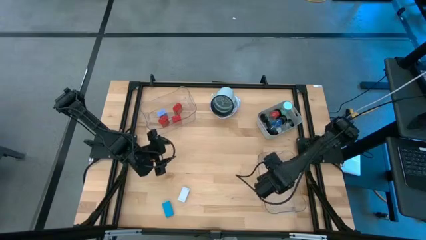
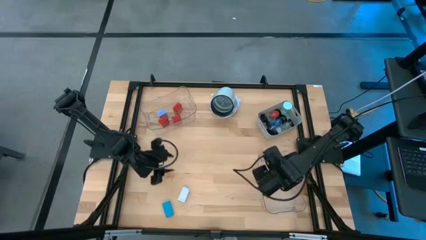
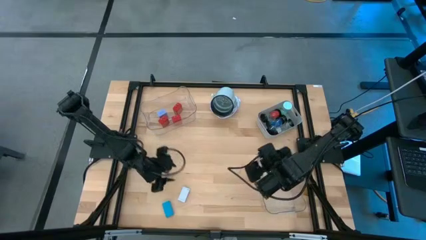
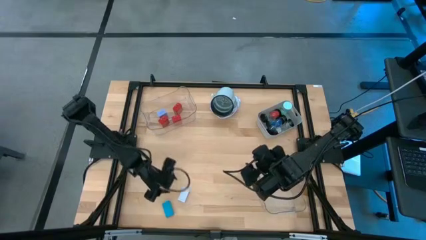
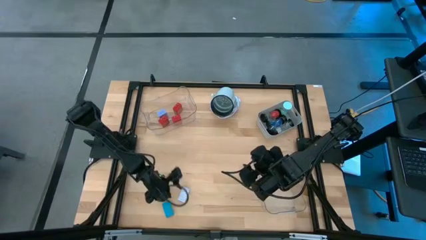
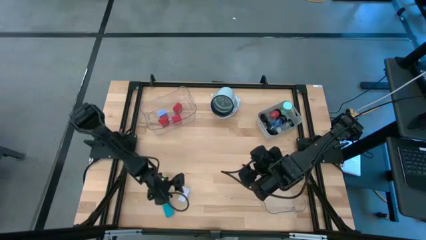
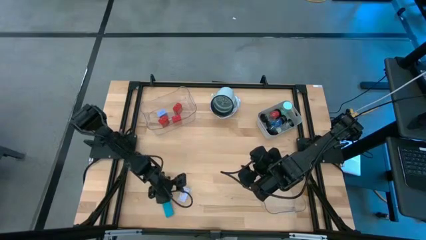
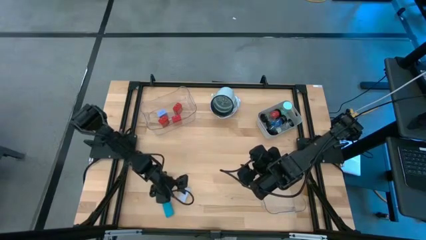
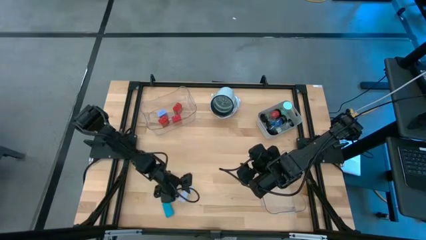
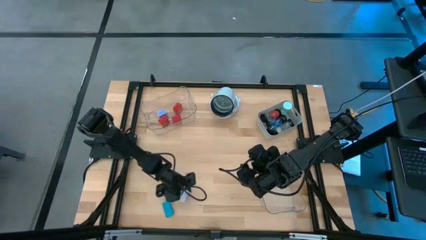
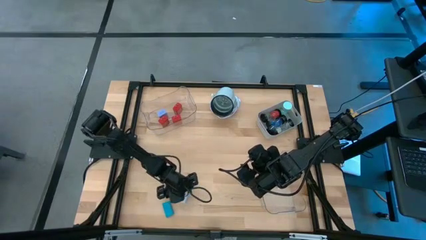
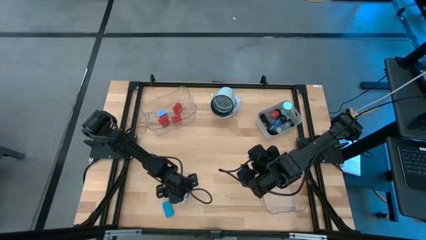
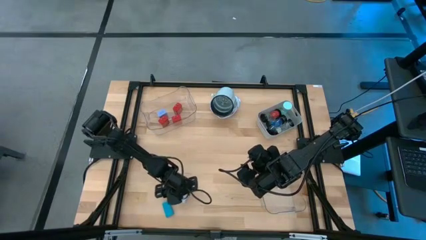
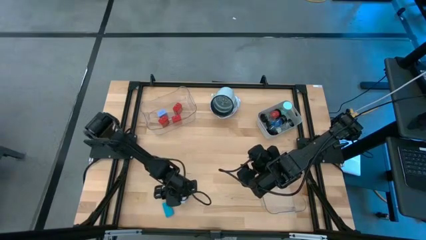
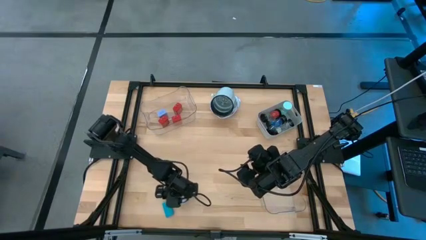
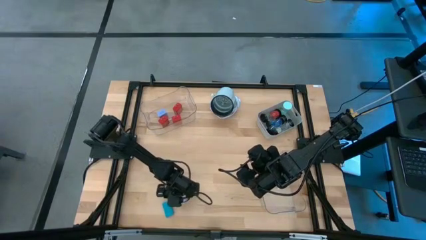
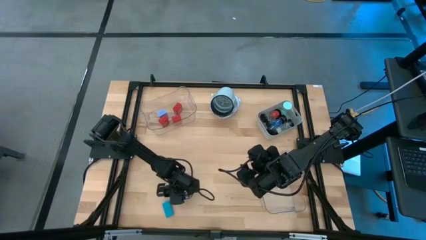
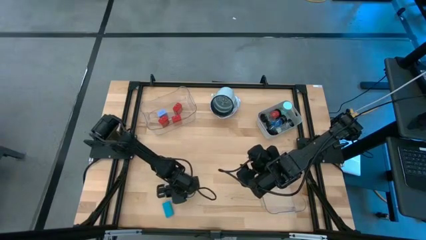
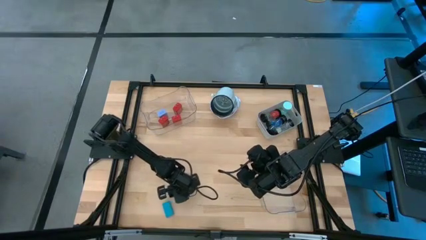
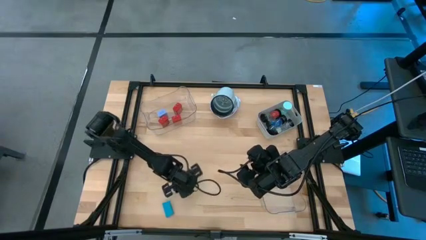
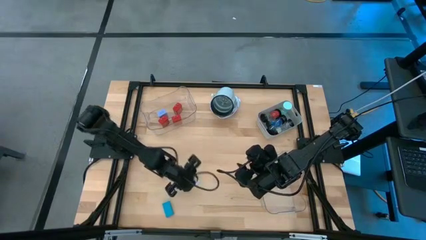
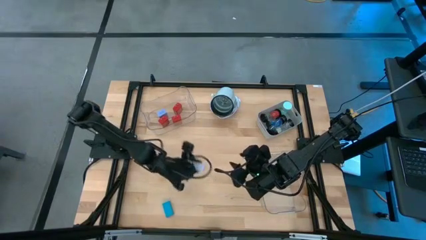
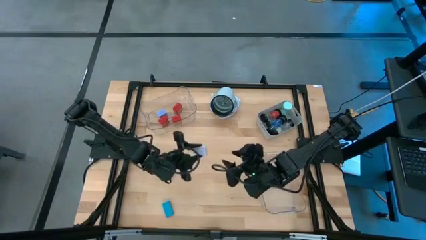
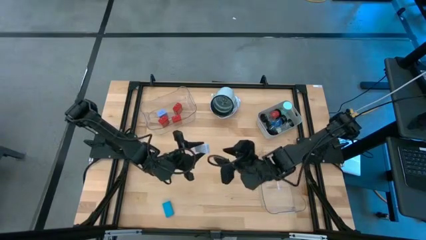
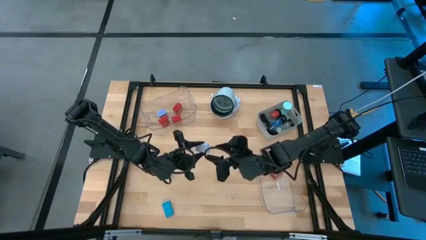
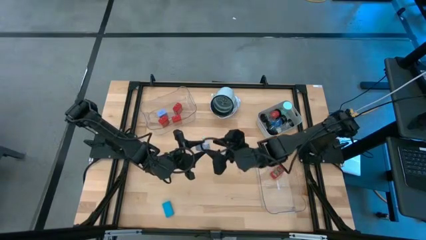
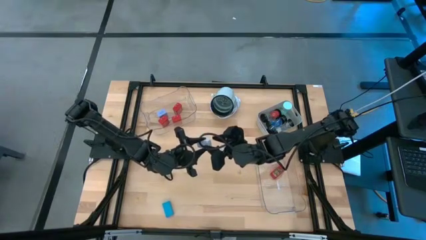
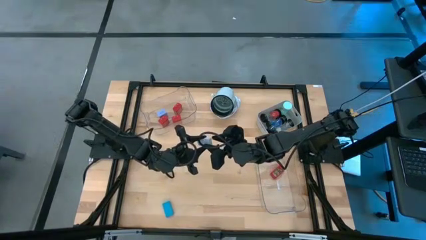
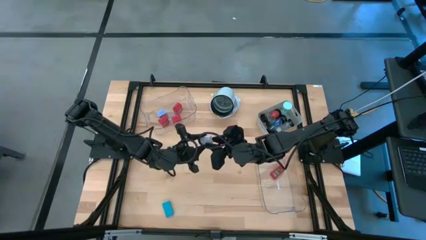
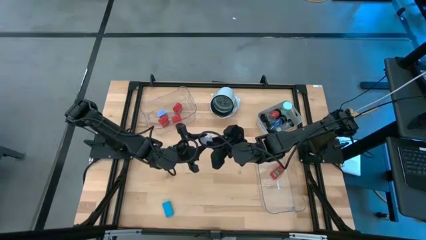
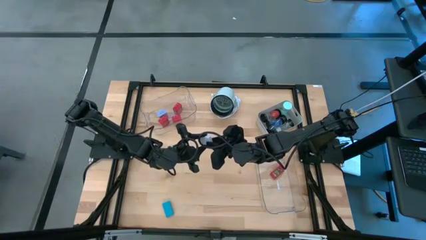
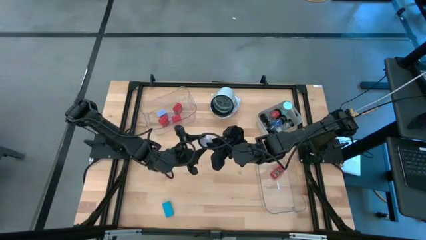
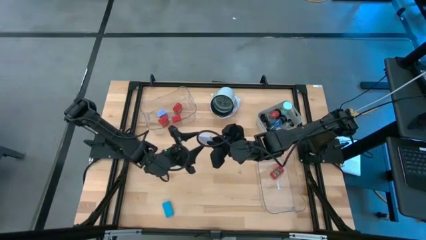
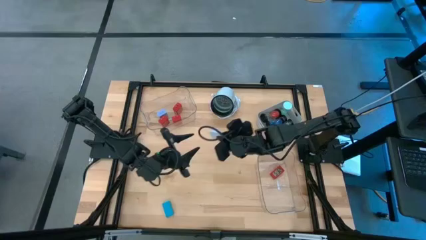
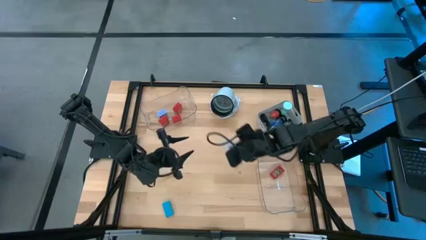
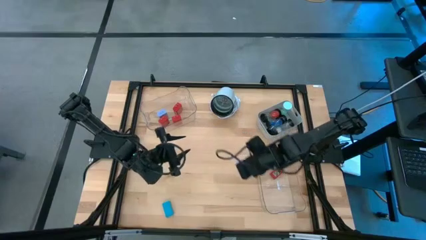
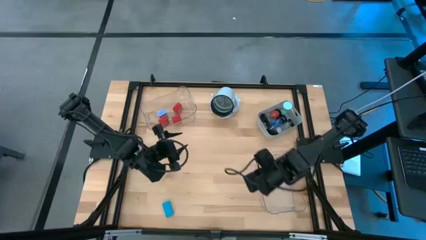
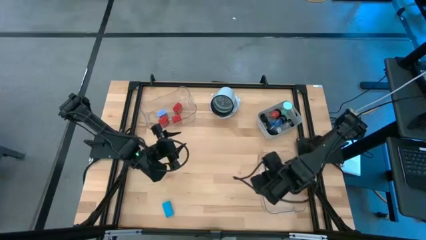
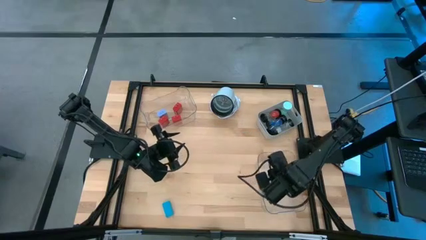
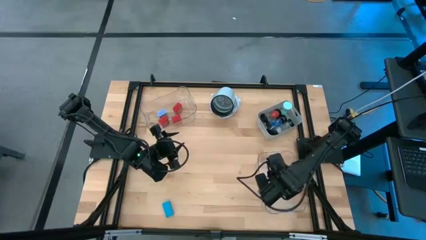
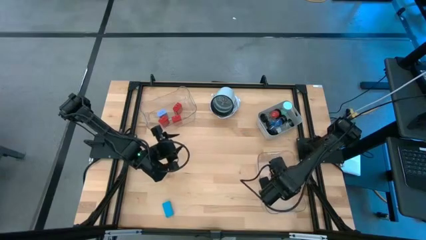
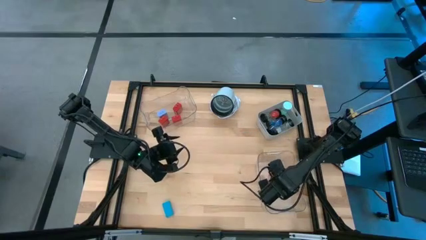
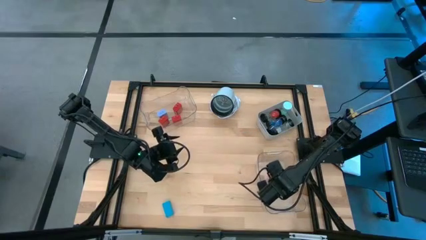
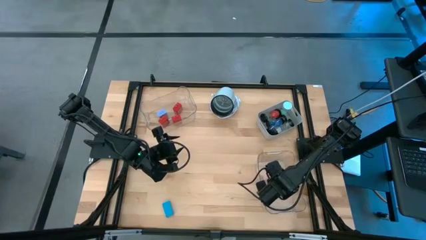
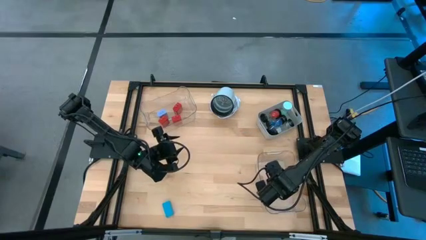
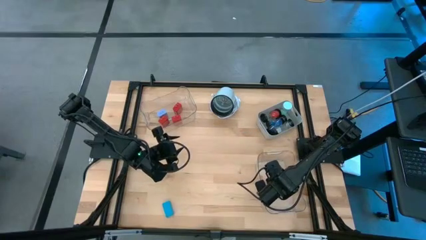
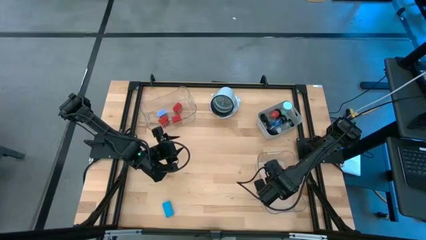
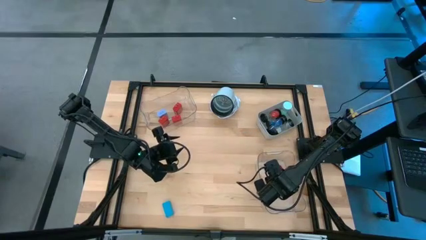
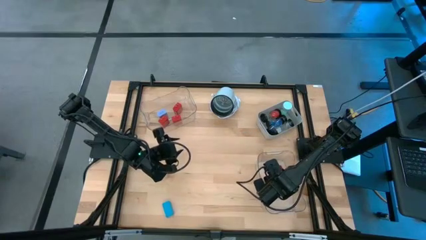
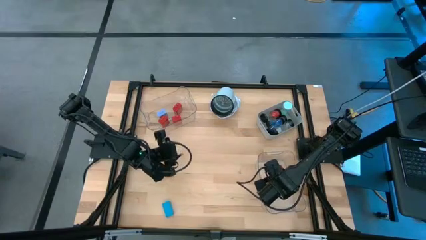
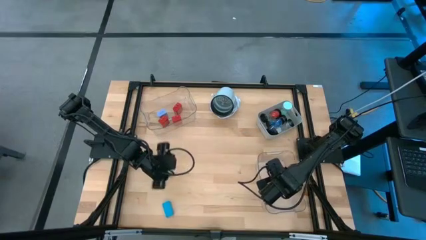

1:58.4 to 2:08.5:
Task: Pick & Place Office items
Put the white digital clock into the right transparent bin

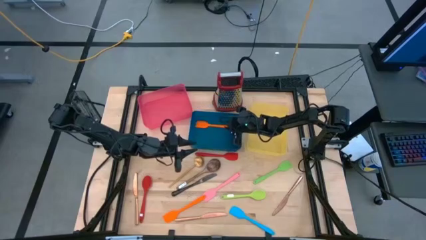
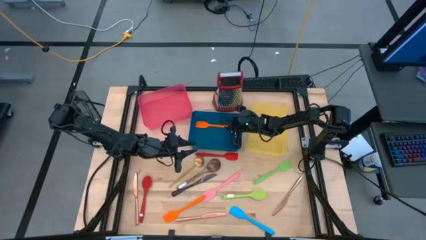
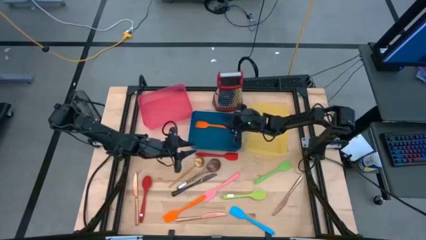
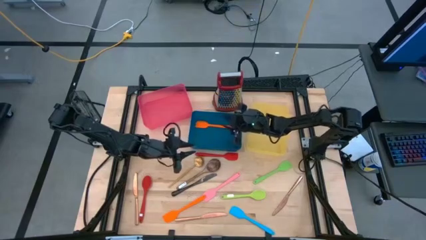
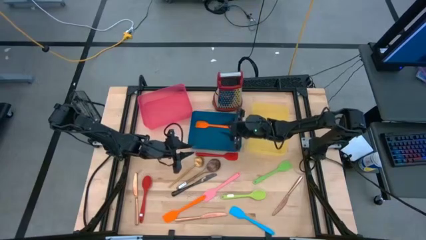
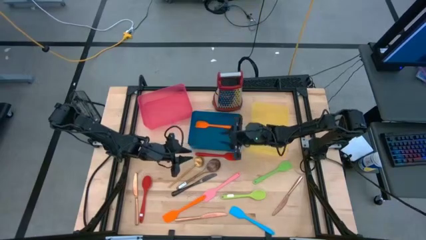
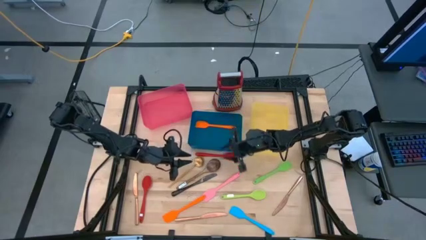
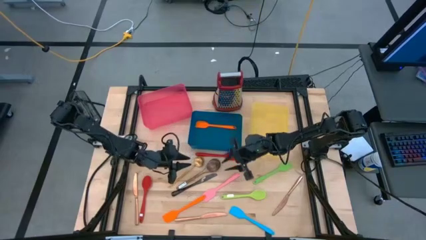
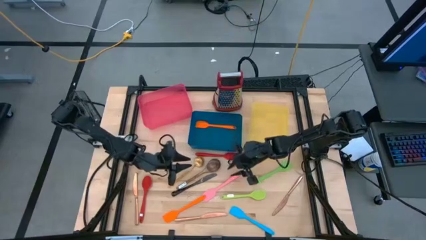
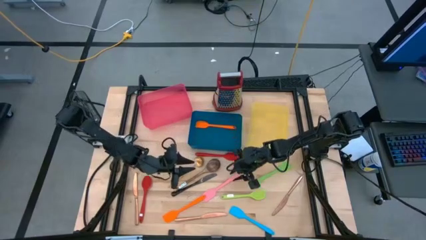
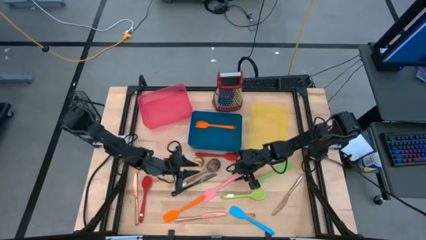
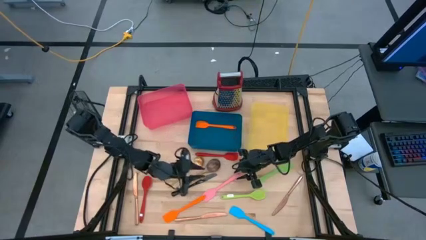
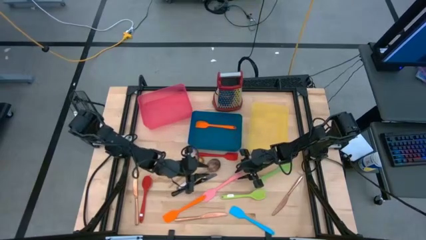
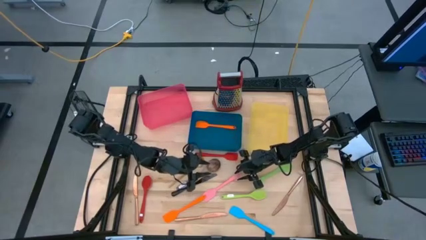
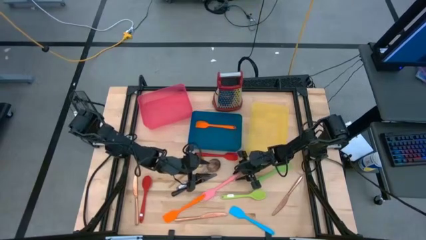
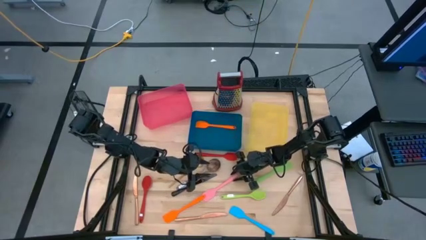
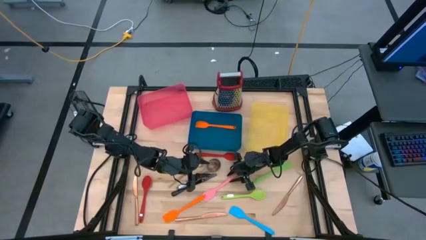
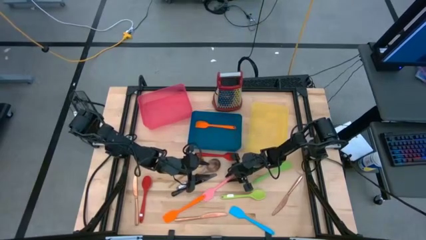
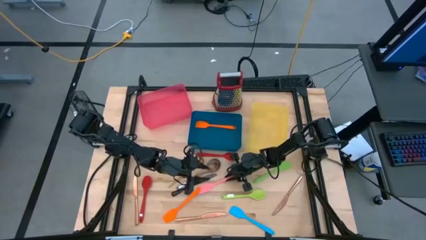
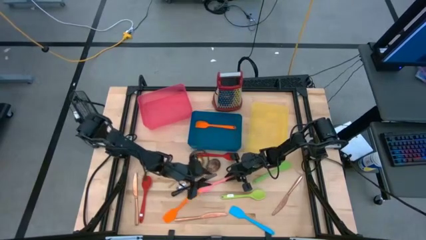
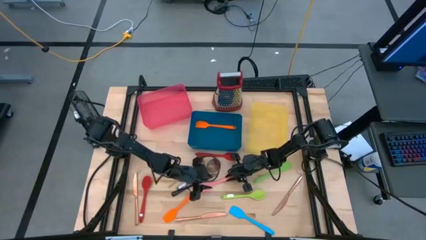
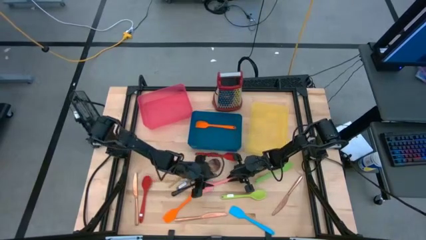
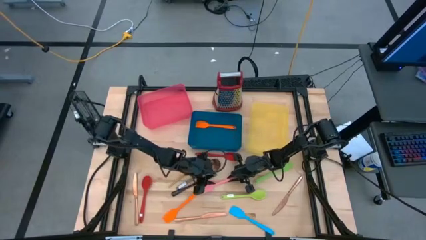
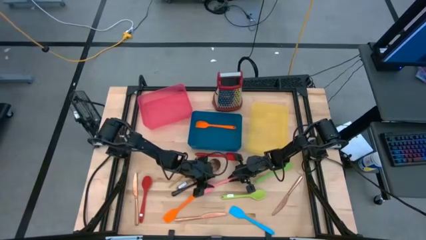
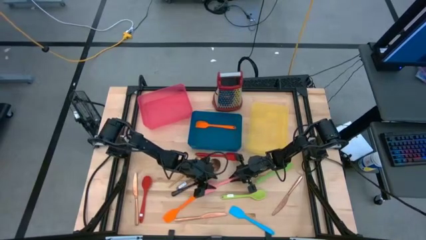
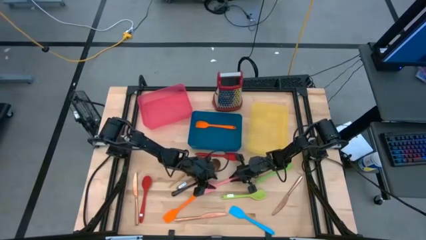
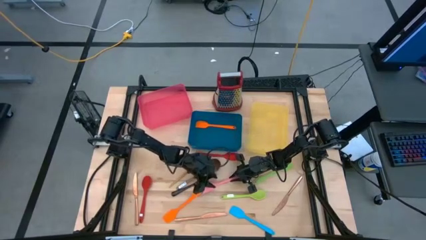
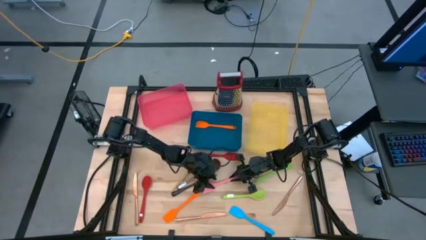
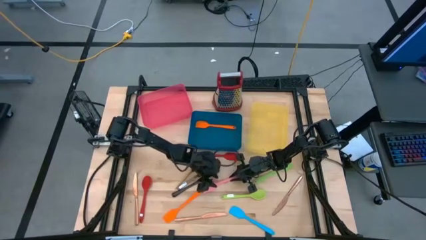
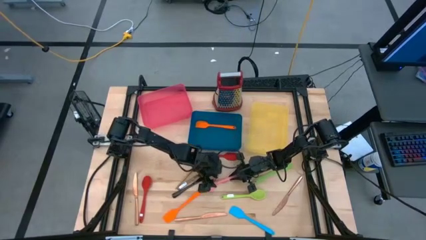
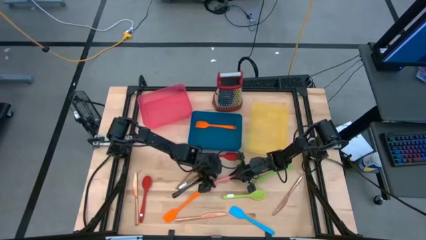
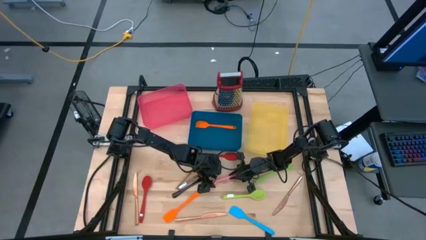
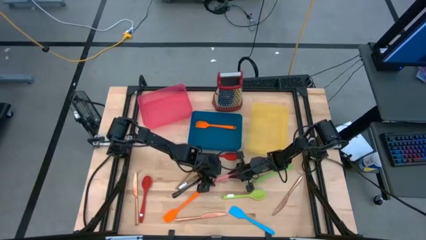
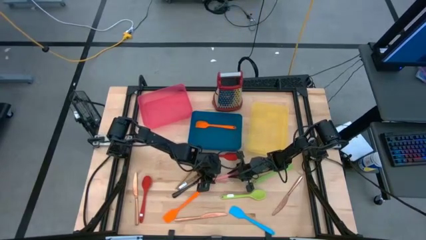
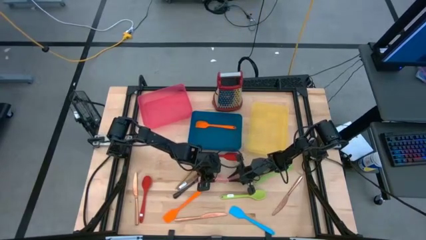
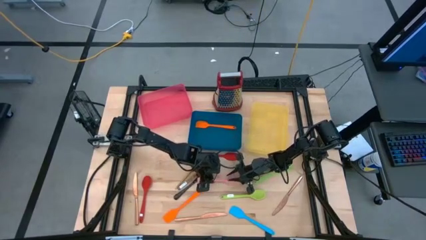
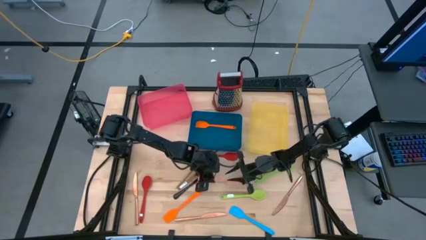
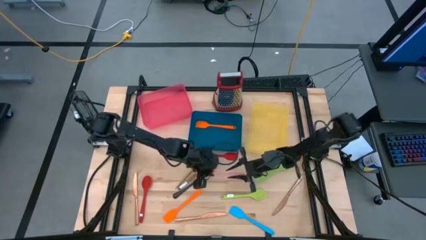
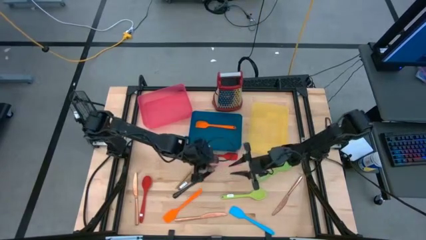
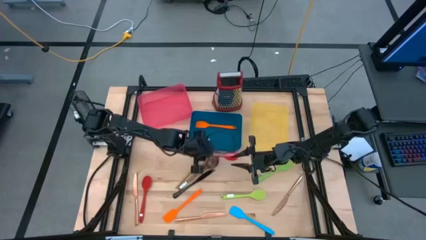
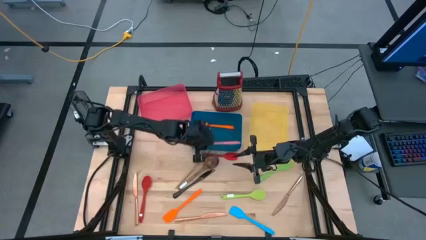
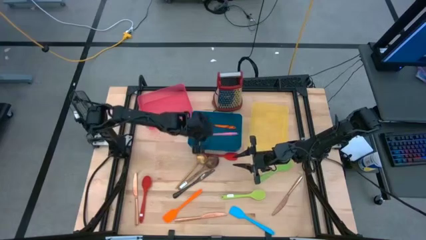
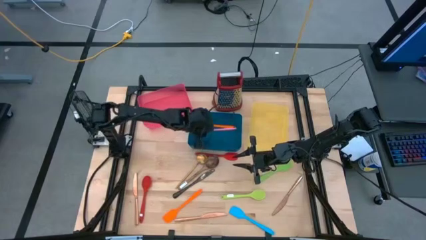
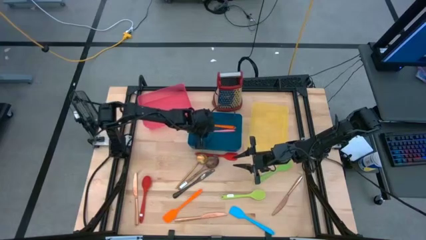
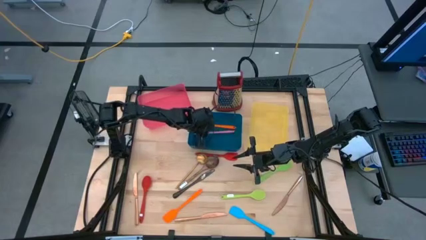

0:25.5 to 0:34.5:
Task: Pick & Place Kitchen Items
Put the pink spatula into the blue bin
